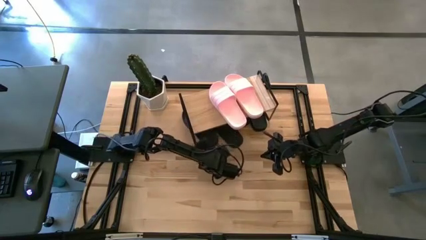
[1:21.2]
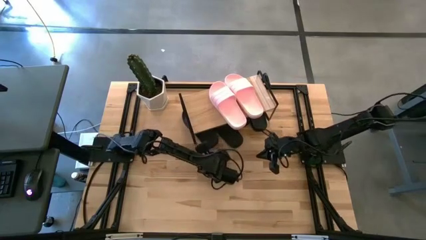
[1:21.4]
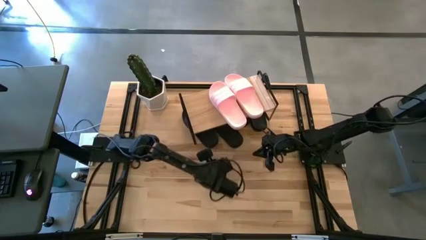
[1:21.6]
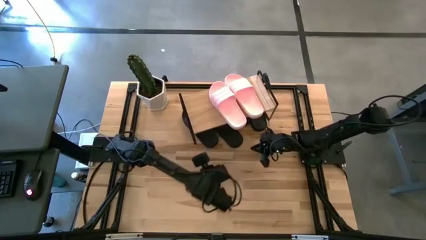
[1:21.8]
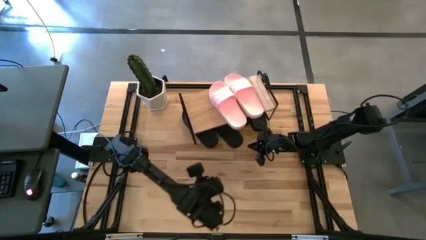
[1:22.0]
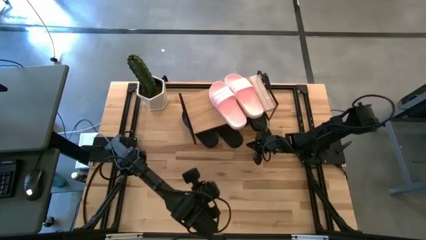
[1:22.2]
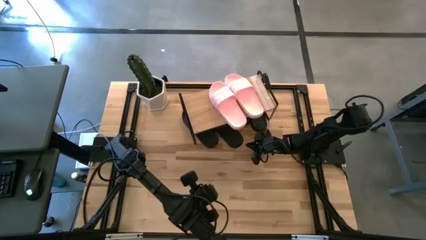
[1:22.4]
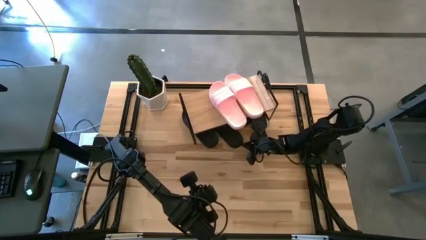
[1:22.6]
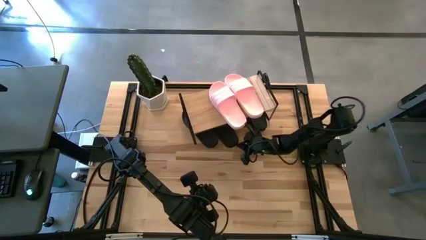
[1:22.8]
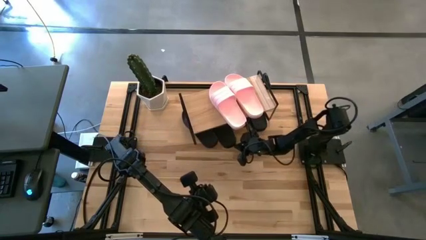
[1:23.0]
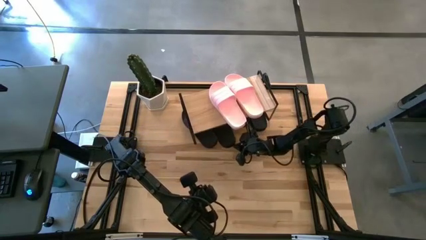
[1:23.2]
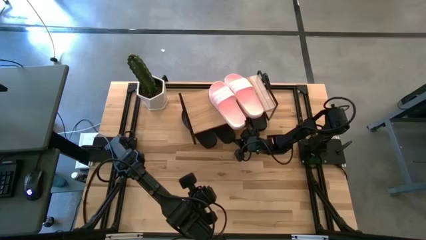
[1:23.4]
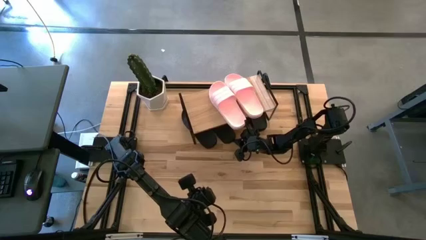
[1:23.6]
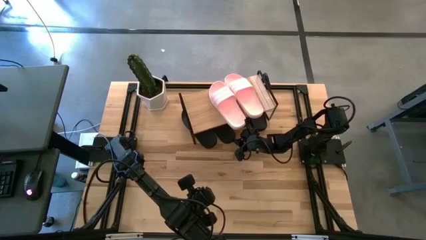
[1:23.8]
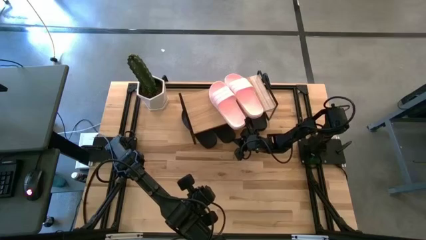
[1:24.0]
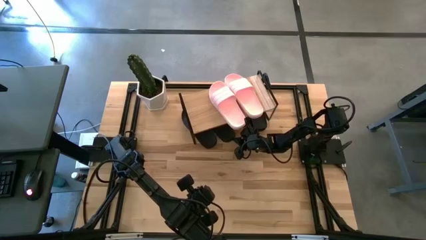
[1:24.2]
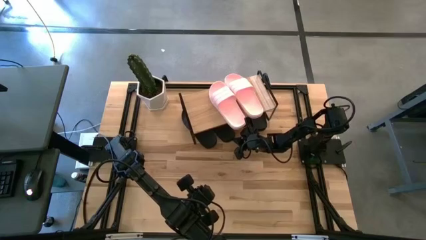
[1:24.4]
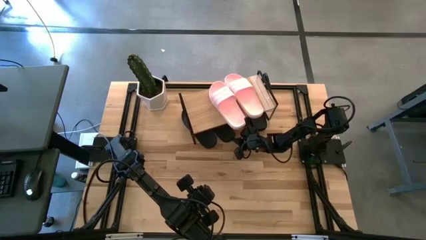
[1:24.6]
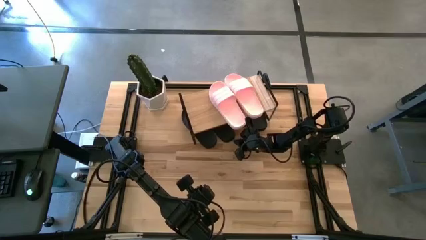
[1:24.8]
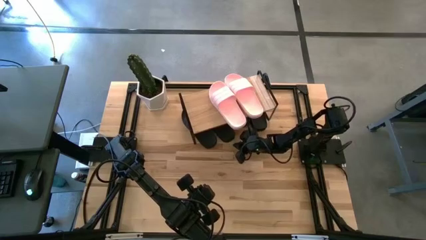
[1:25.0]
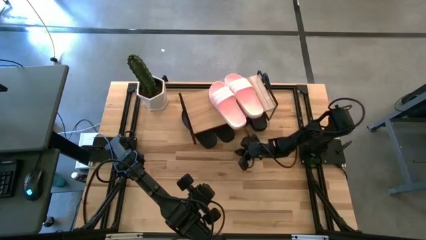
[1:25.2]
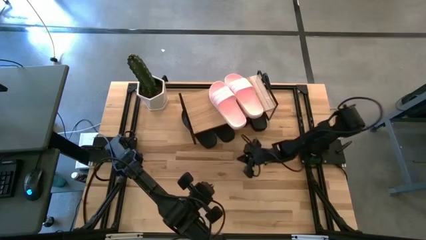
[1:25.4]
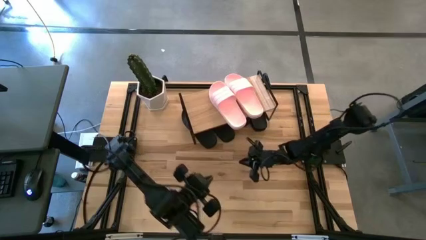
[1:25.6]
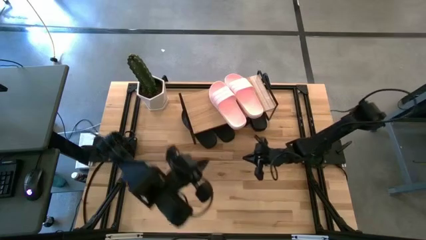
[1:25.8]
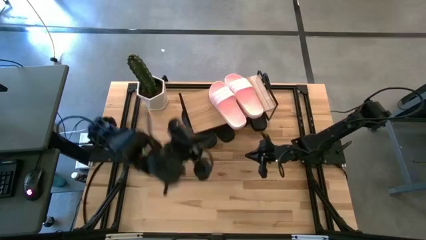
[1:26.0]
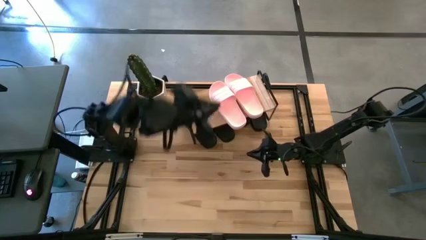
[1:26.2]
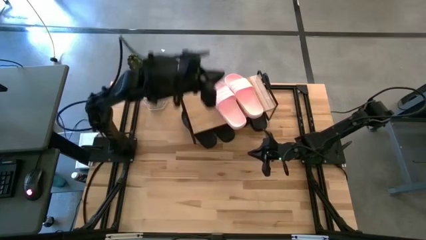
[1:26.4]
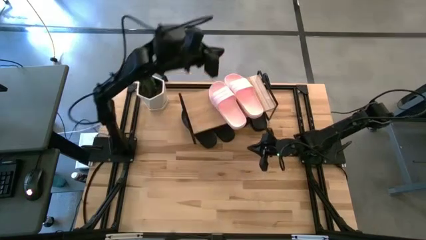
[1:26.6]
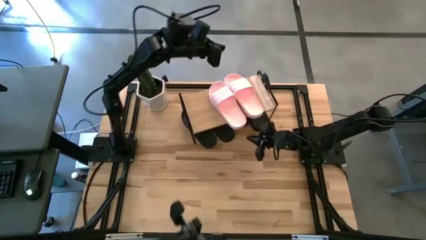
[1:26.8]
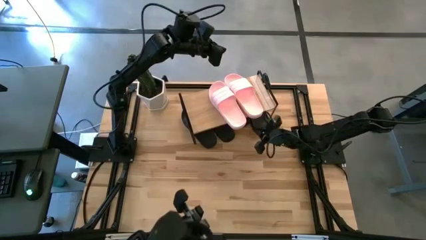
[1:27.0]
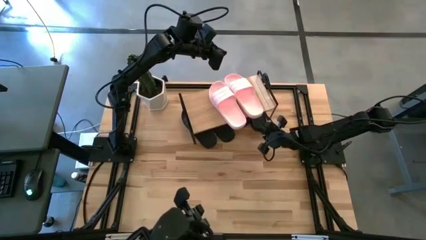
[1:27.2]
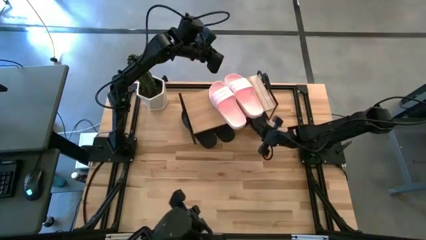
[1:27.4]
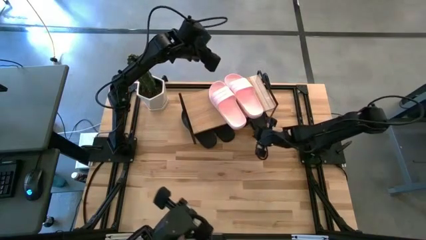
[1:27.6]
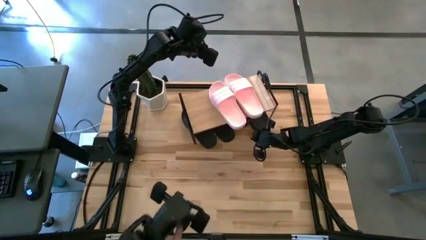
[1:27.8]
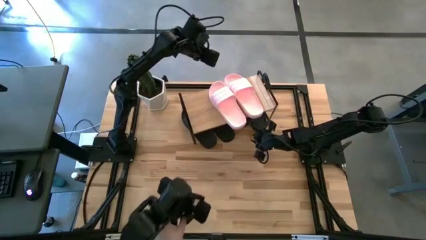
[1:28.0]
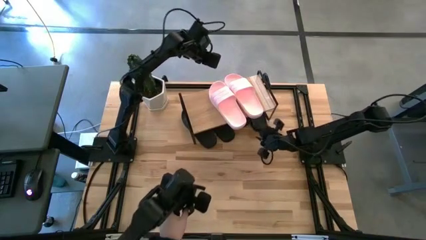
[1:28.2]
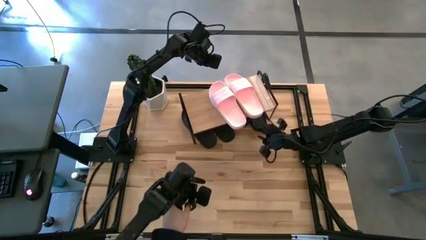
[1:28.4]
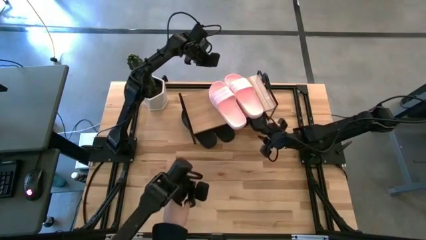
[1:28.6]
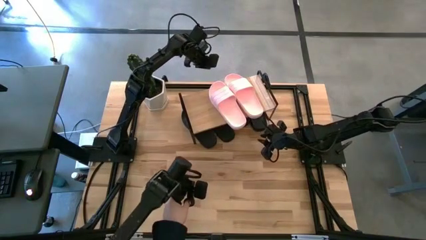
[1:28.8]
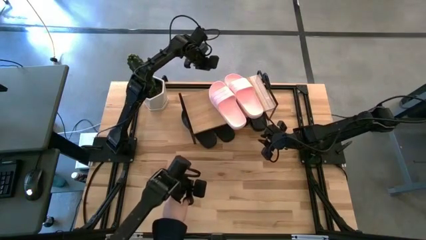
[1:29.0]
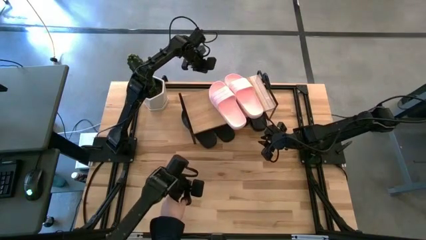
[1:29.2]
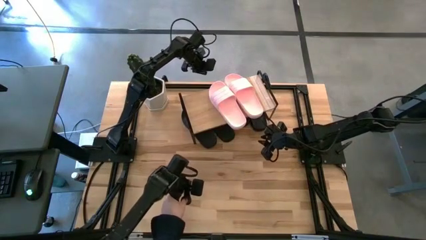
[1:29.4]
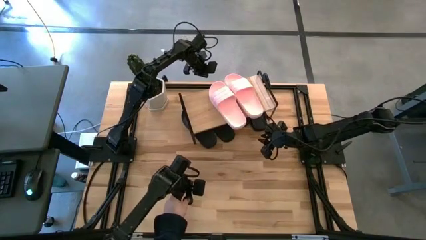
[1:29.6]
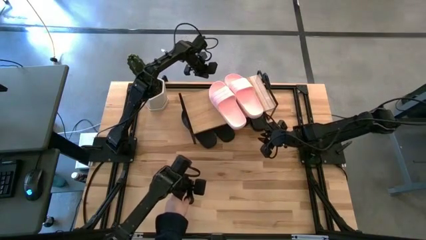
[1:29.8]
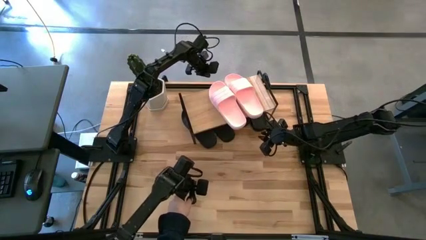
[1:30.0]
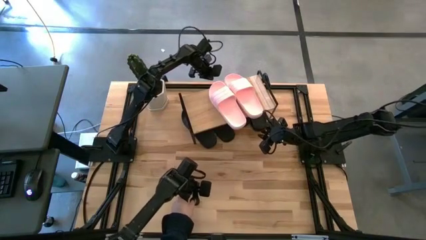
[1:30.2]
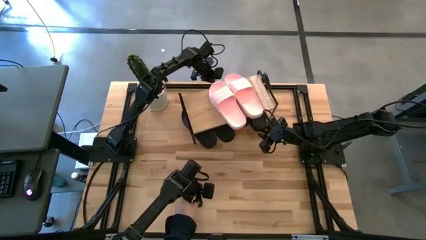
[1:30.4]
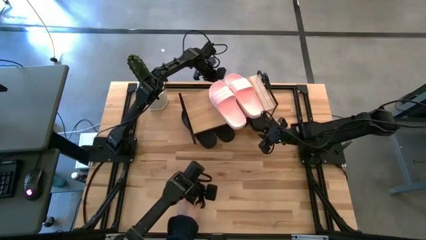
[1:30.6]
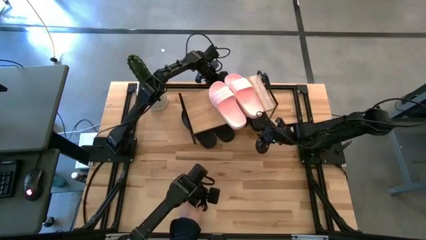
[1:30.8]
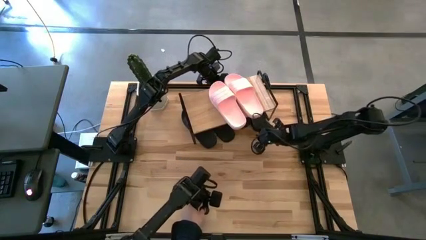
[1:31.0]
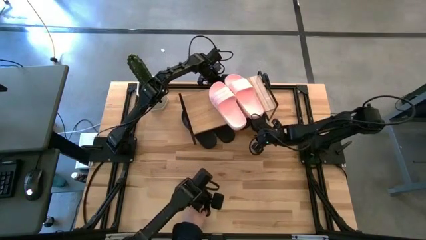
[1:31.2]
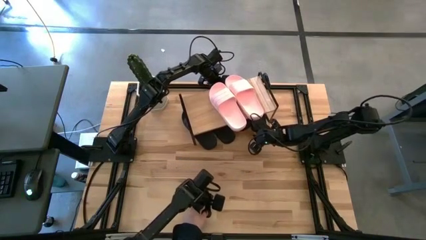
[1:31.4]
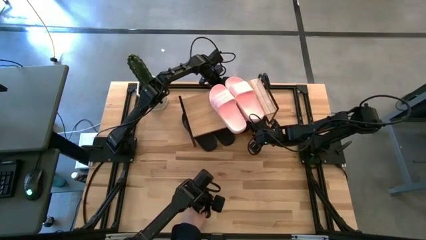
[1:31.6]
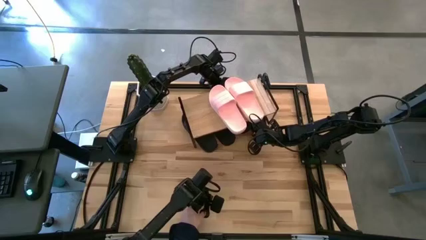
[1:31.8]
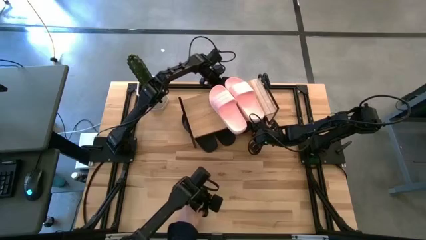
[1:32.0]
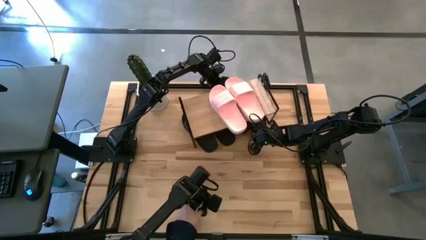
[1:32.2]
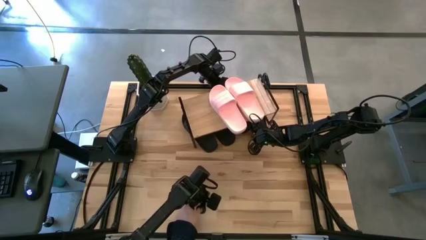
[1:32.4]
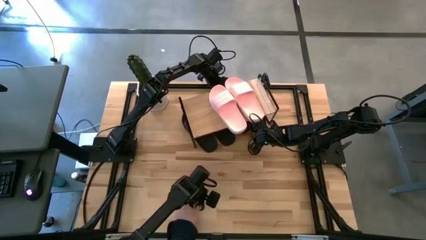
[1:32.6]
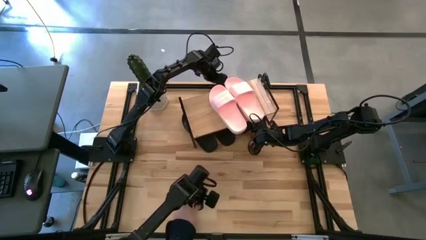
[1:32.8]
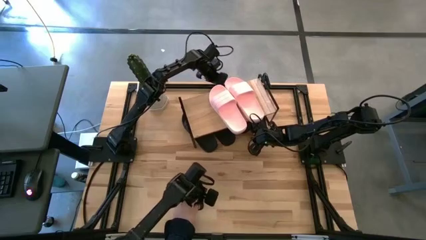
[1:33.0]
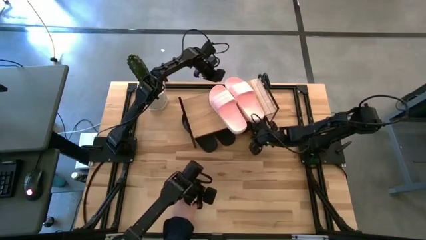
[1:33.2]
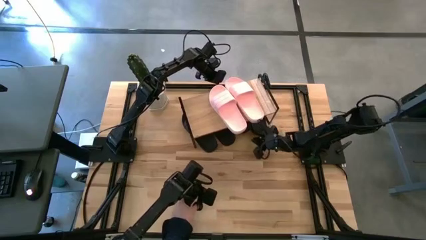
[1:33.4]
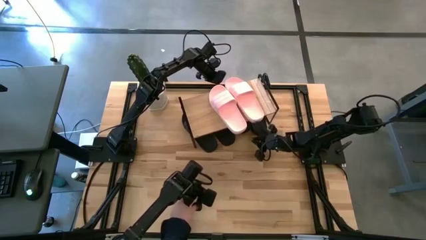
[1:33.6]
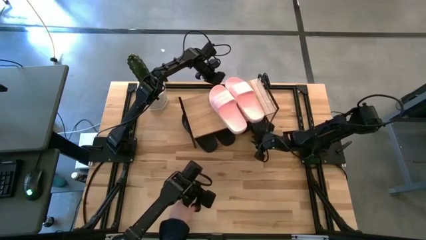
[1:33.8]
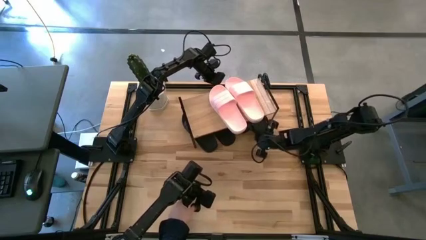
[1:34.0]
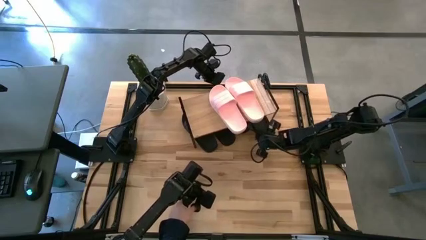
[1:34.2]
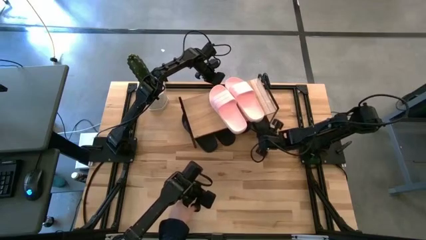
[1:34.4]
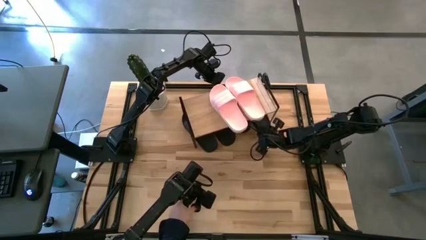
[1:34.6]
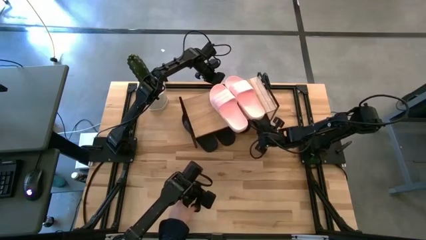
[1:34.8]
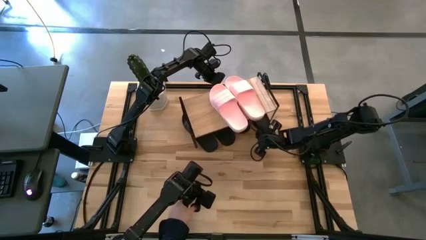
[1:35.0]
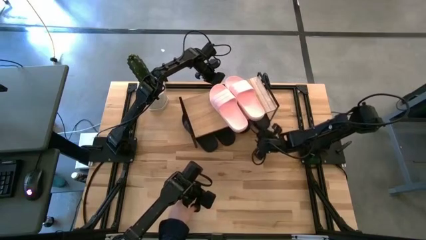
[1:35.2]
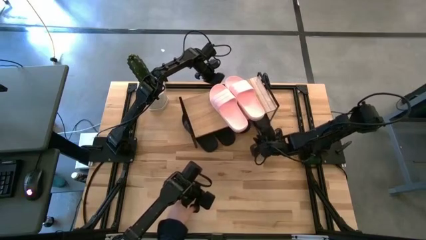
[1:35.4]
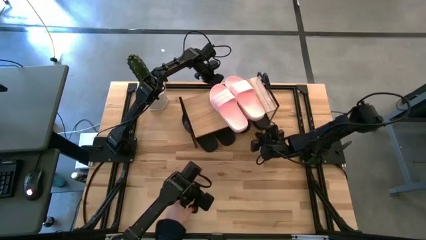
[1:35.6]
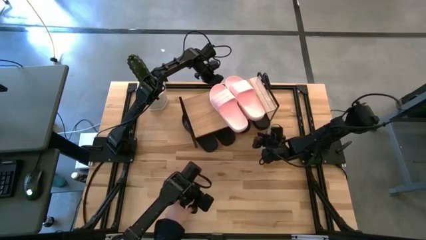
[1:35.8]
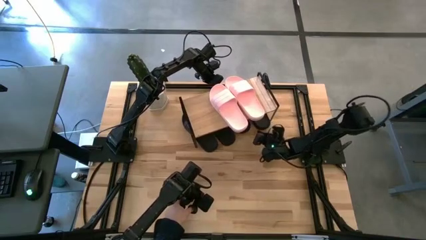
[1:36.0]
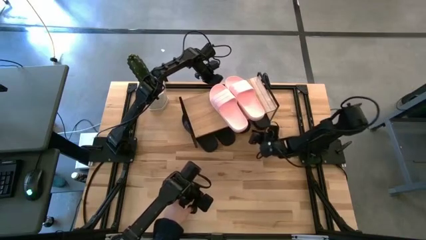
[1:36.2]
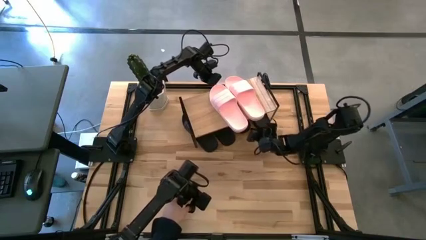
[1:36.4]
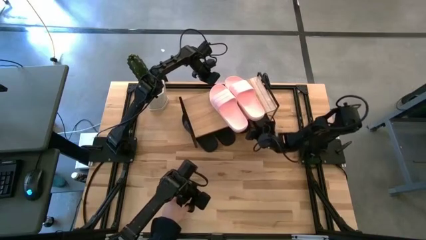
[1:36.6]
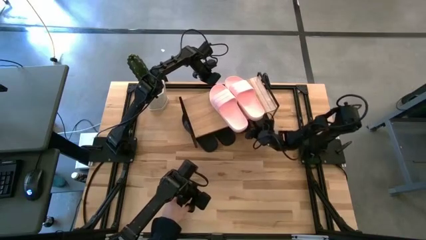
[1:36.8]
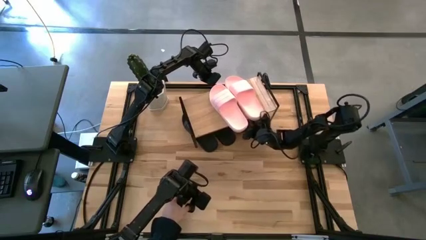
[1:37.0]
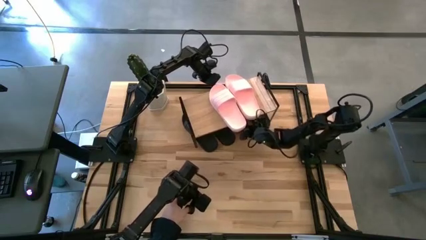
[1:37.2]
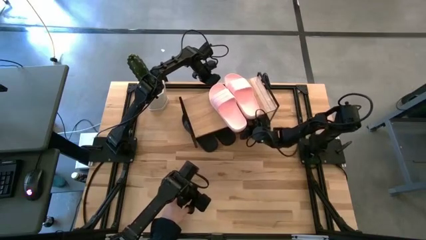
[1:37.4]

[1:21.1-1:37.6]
Task: Pick and place slides into the shelf
Adjust the black slides under the shelf
